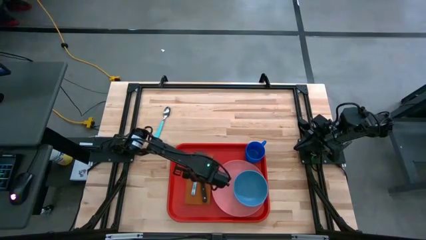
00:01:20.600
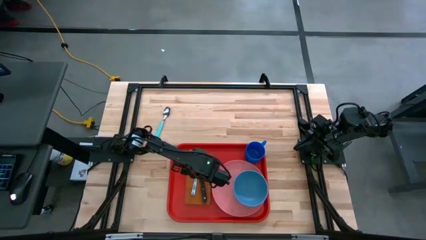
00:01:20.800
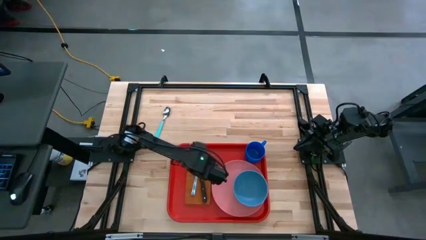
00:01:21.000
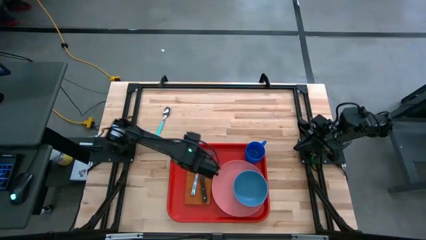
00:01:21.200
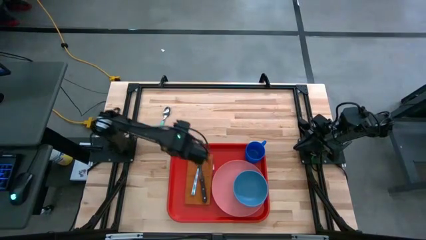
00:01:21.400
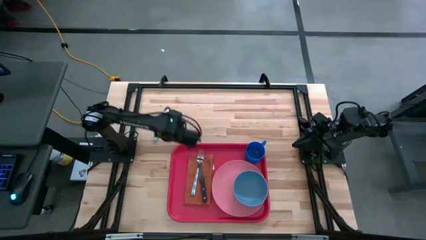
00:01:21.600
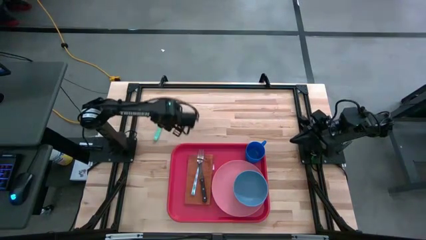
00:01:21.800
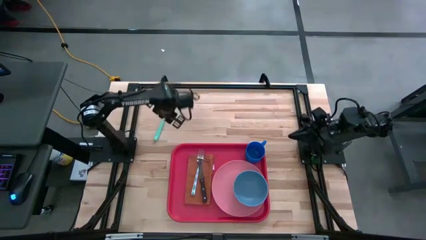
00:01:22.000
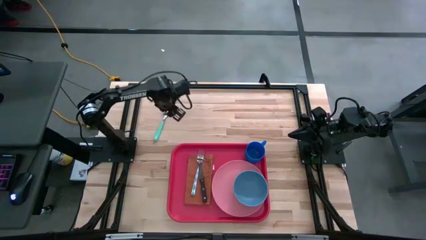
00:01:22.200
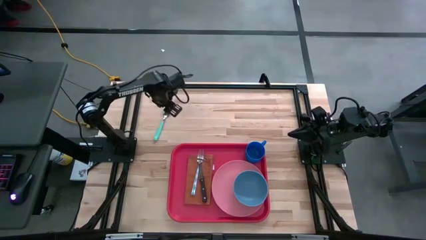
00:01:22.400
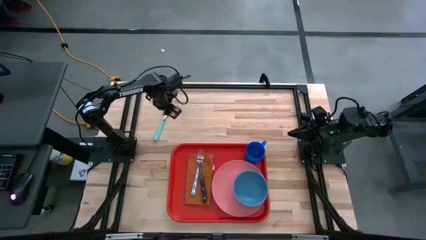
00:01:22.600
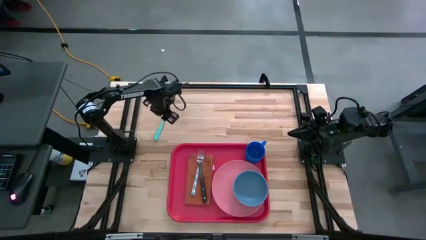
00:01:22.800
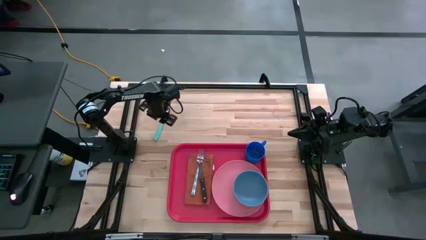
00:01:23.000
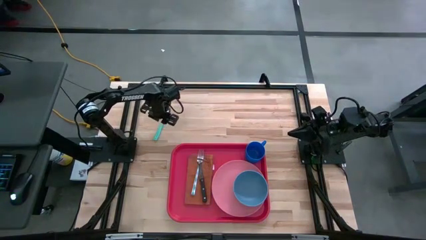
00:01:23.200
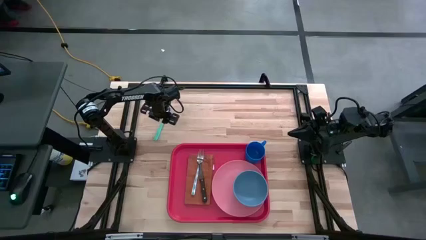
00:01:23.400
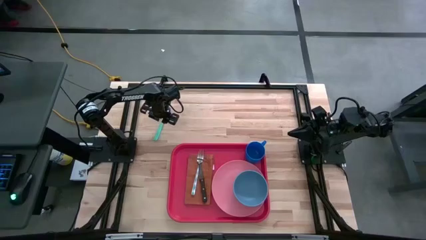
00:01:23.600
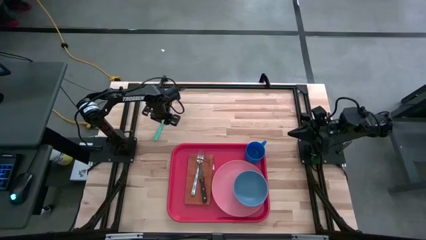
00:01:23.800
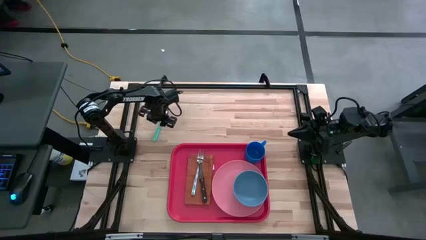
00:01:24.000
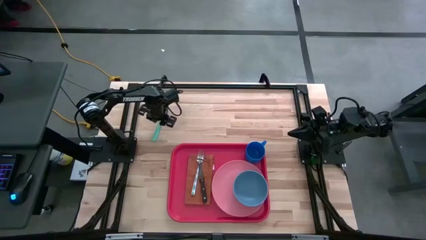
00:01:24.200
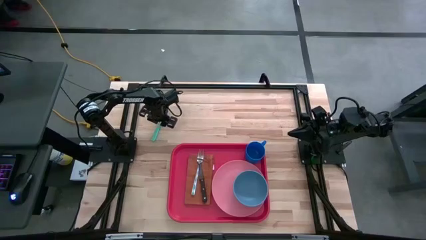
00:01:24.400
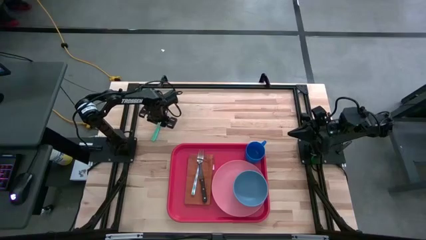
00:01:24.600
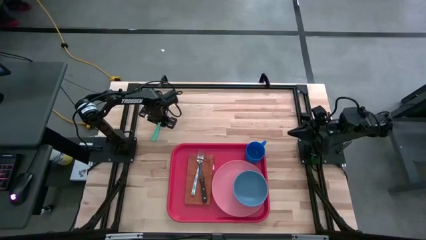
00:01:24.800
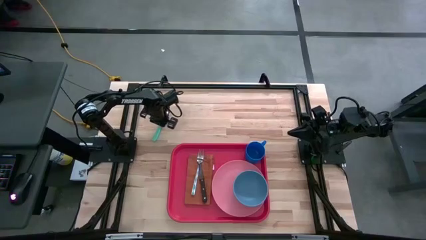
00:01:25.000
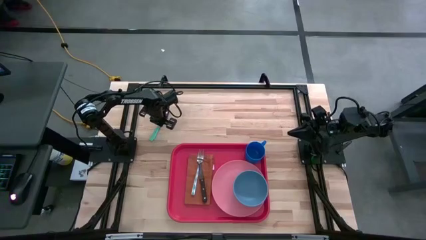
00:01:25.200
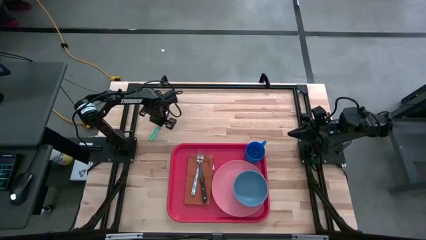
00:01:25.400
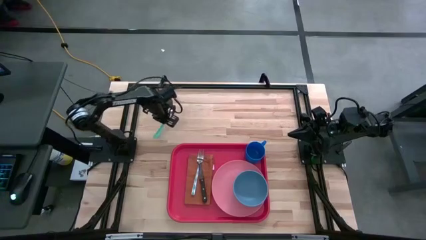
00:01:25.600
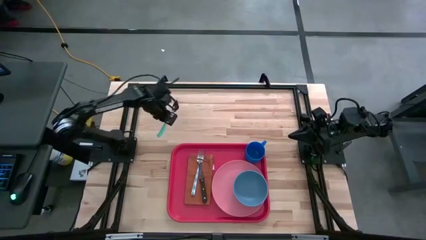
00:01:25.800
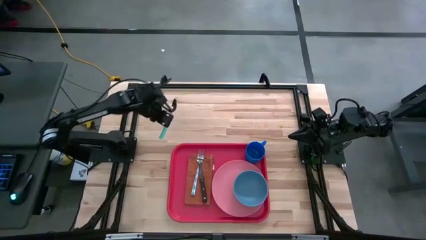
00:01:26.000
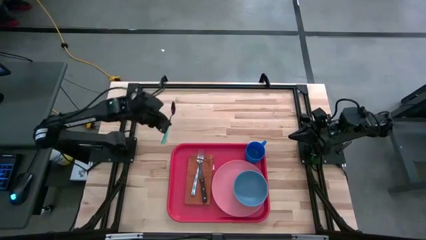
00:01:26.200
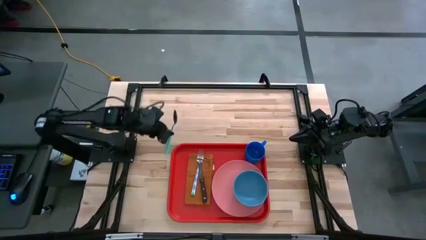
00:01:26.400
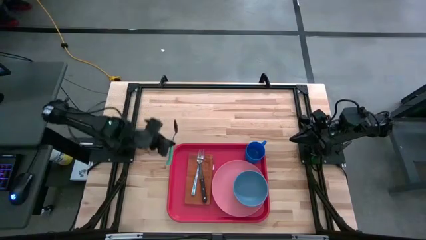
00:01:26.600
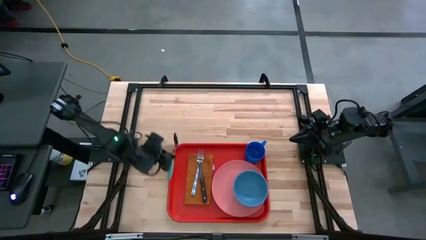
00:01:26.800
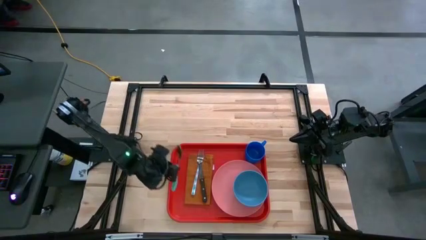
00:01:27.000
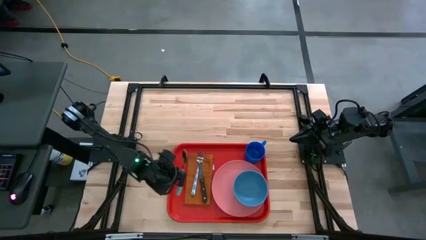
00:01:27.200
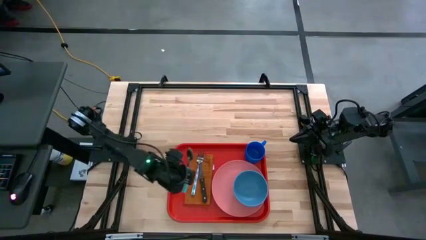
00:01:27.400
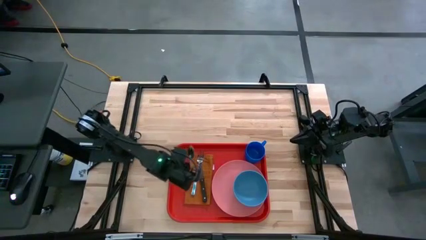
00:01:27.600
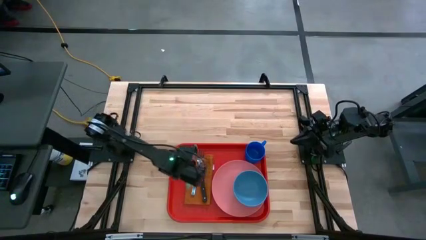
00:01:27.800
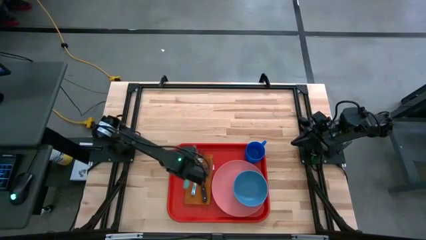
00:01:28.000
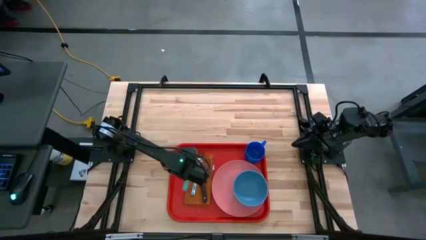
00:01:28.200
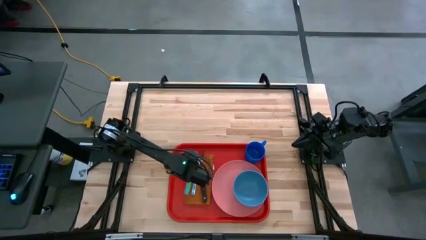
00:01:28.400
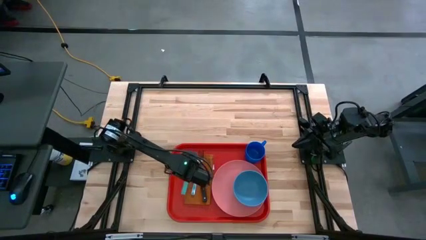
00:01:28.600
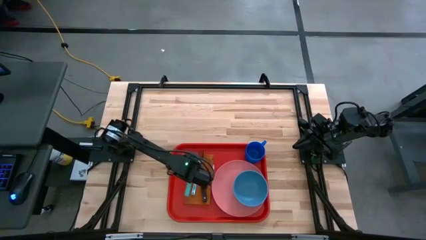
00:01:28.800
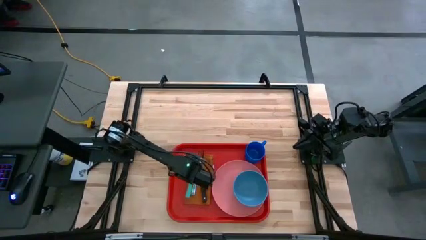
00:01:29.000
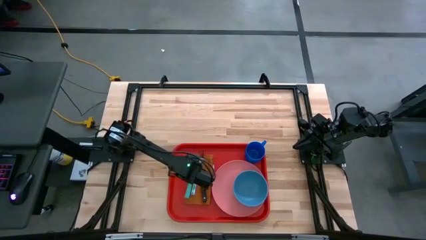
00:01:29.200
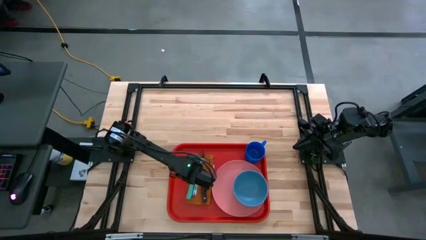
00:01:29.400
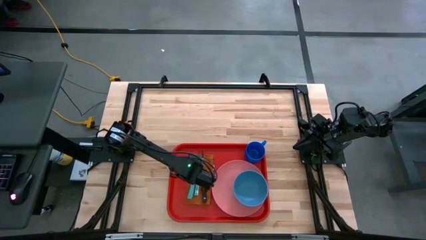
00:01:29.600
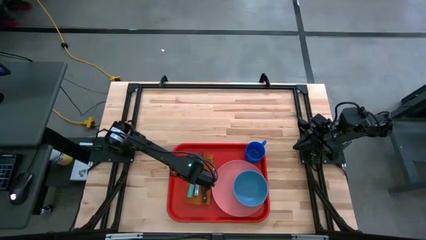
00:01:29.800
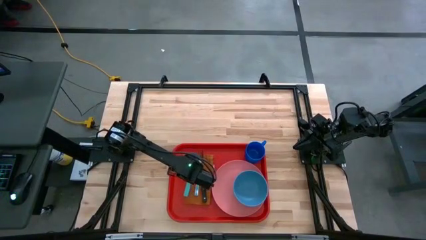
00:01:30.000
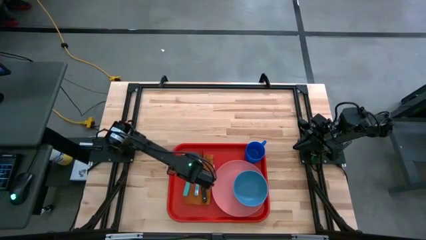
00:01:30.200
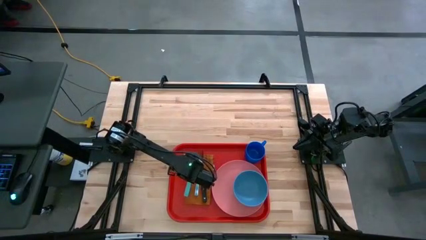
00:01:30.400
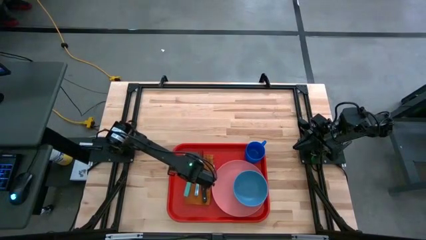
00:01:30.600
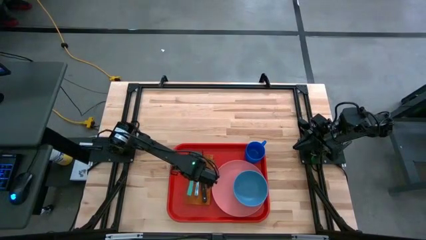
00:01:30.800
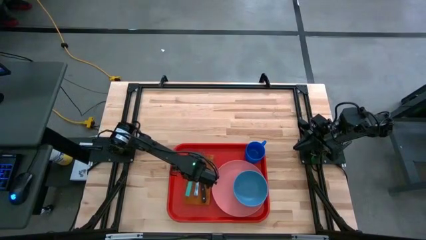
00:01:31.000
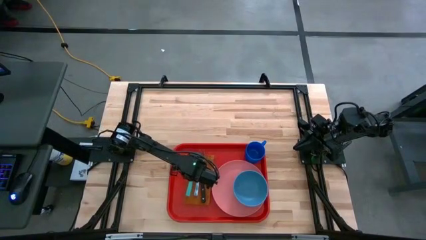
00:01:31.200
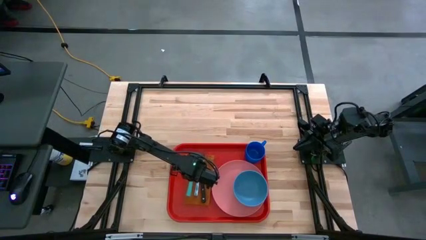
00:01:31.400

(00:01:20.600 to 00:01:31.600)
Task: Set up tray
Put the blue spoon on the left side of the blue patterned fork
